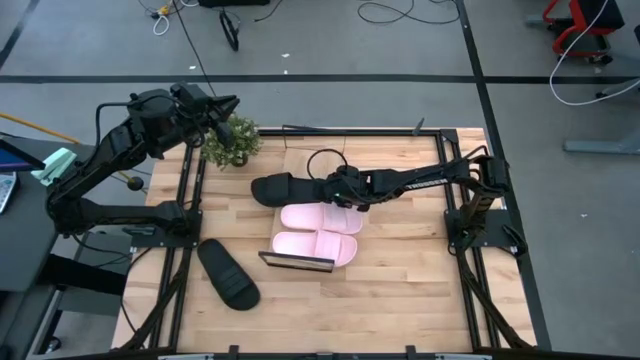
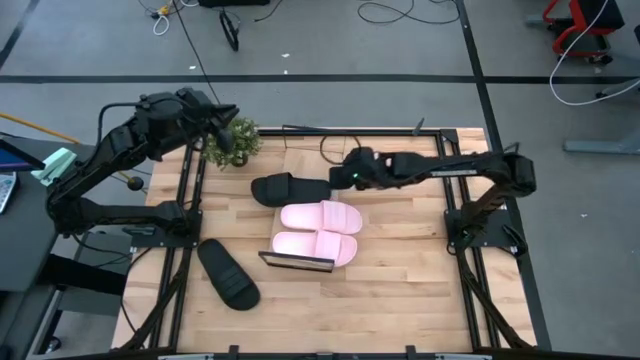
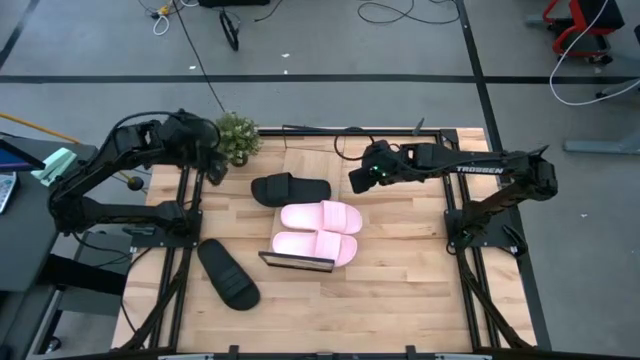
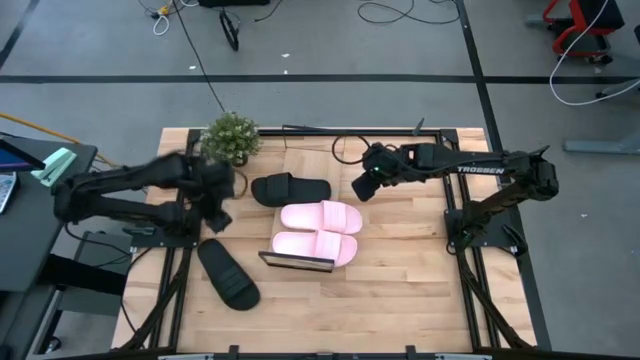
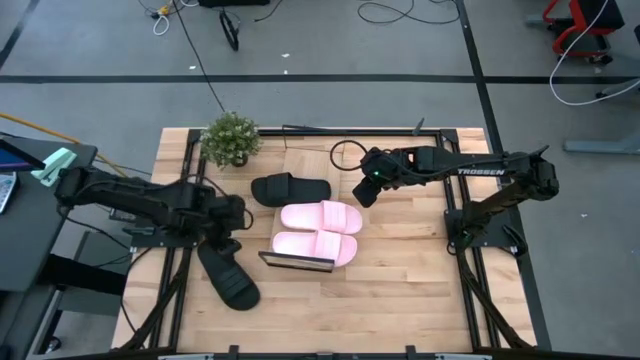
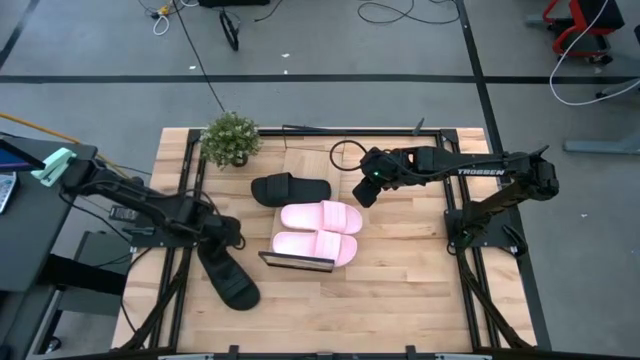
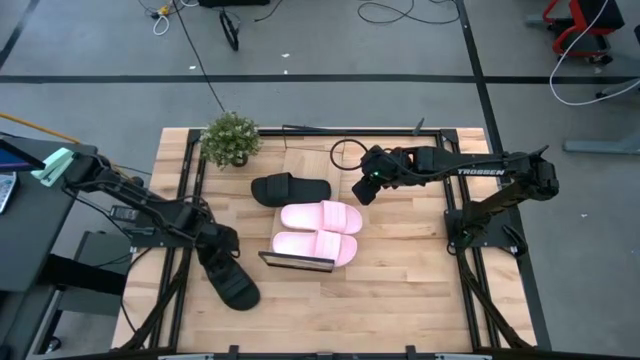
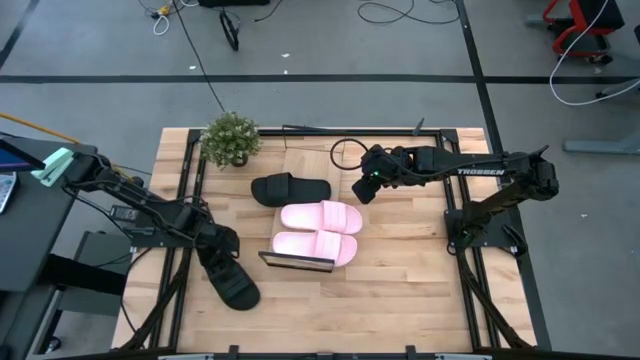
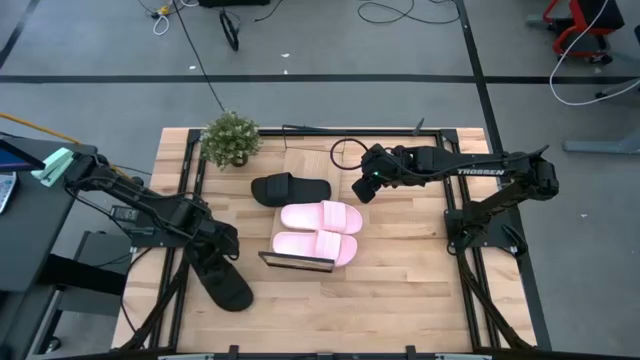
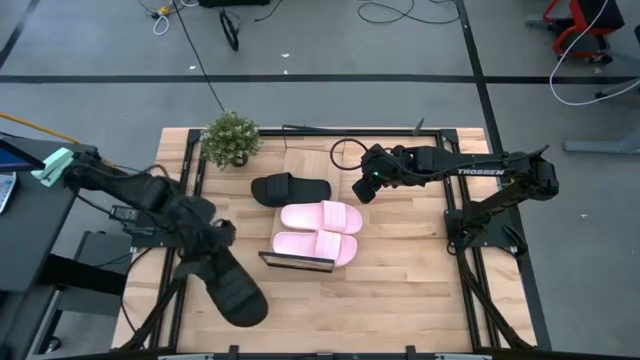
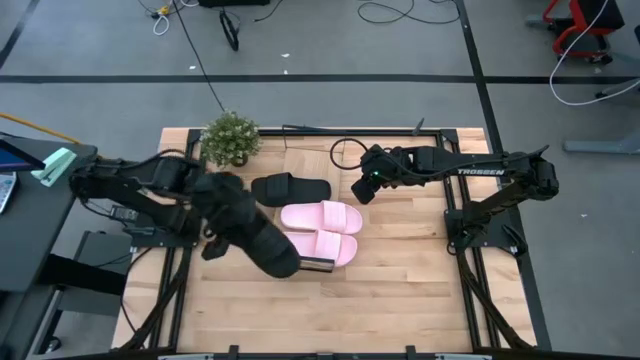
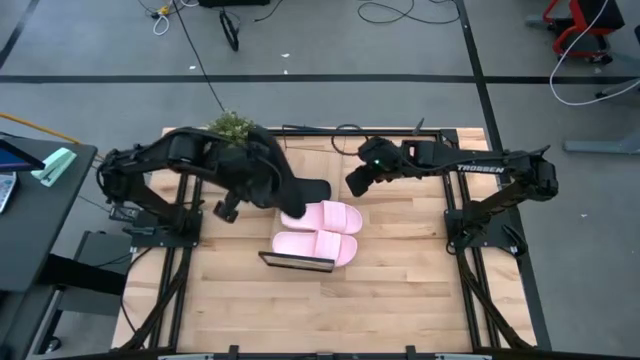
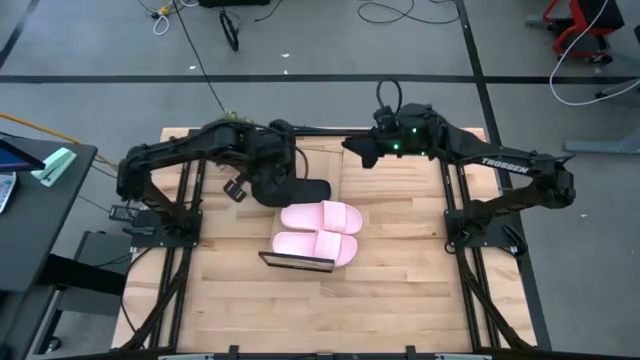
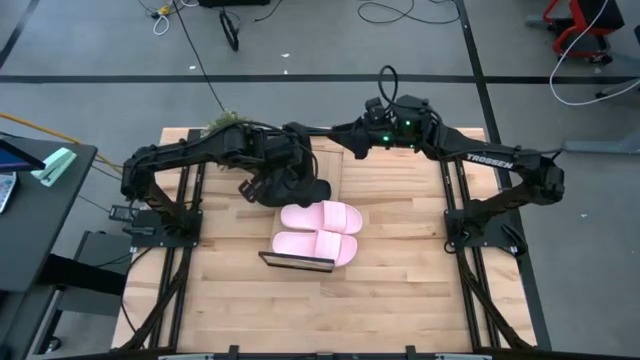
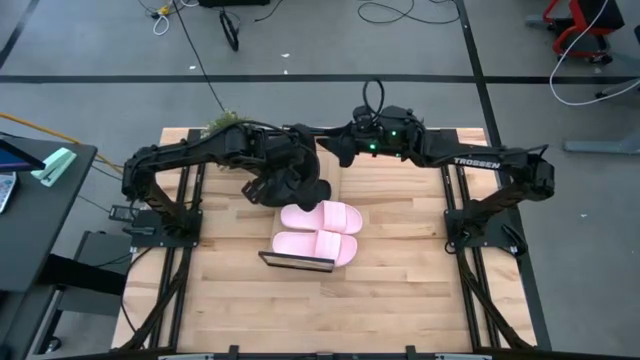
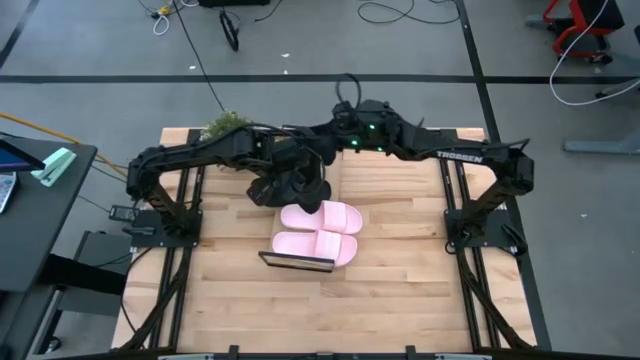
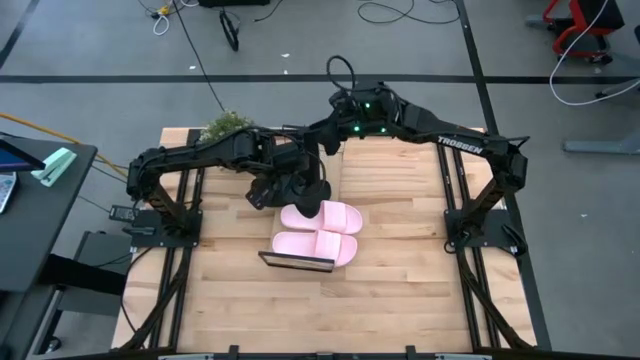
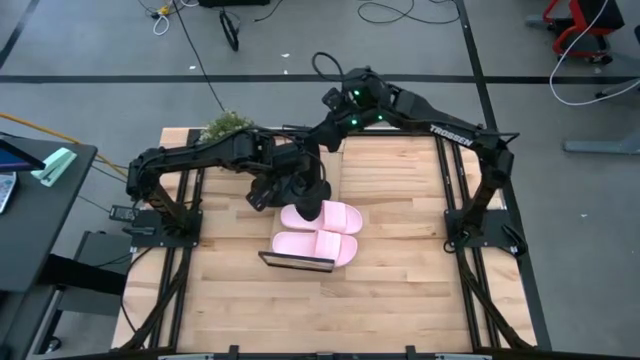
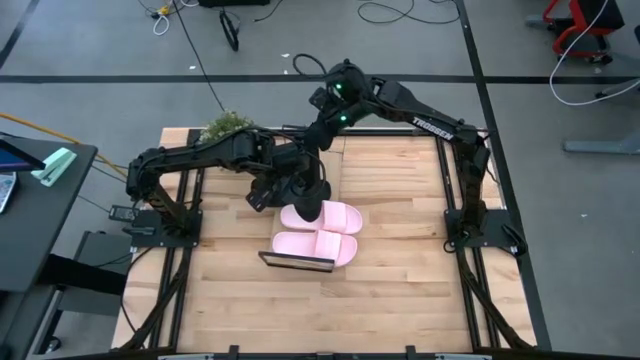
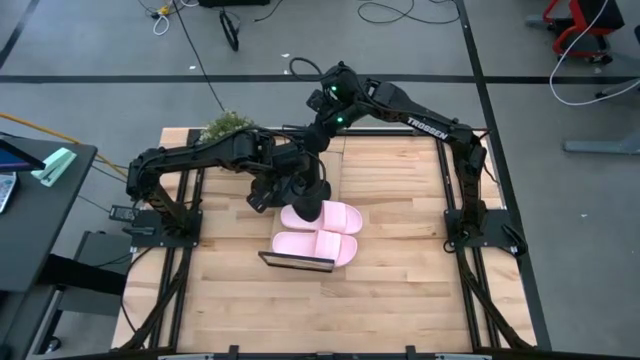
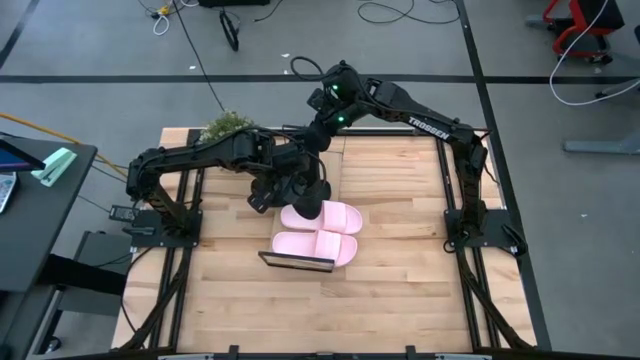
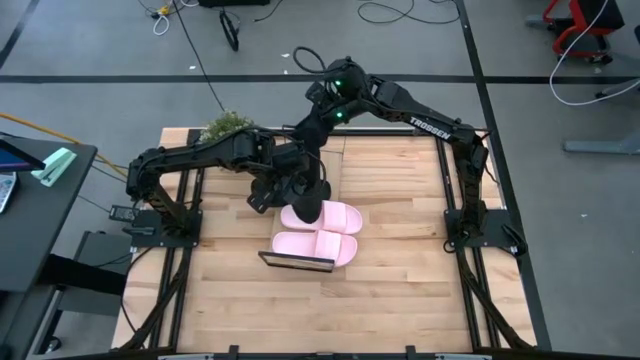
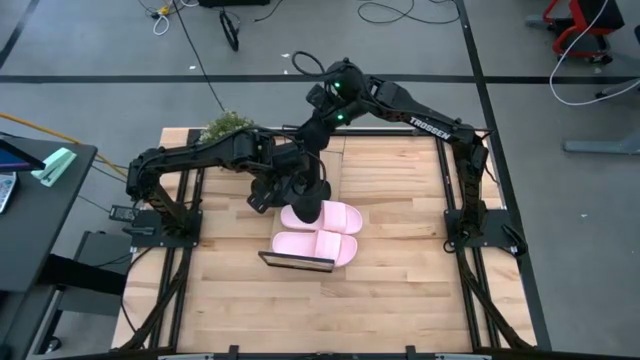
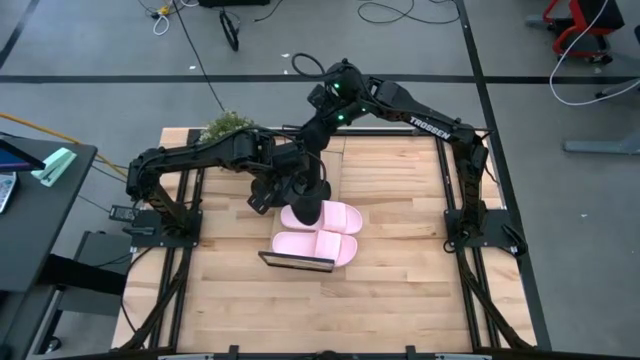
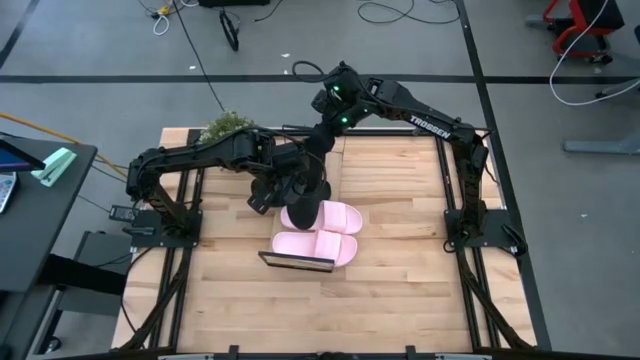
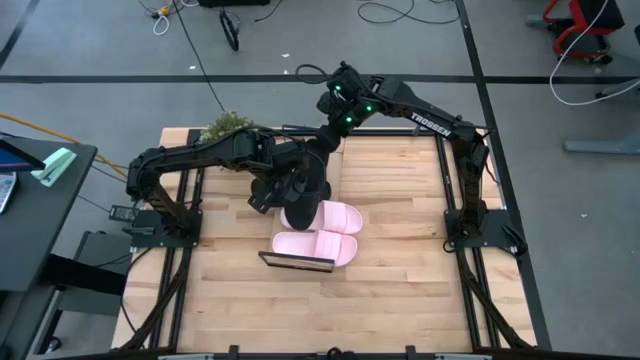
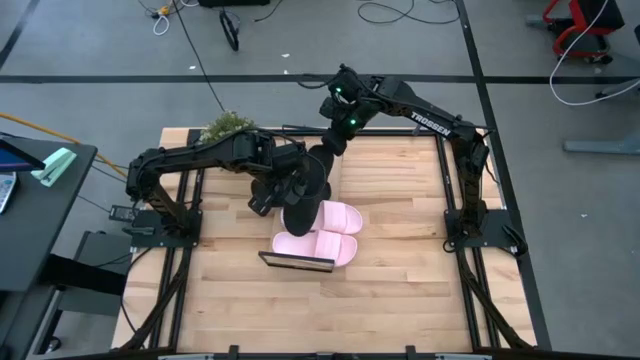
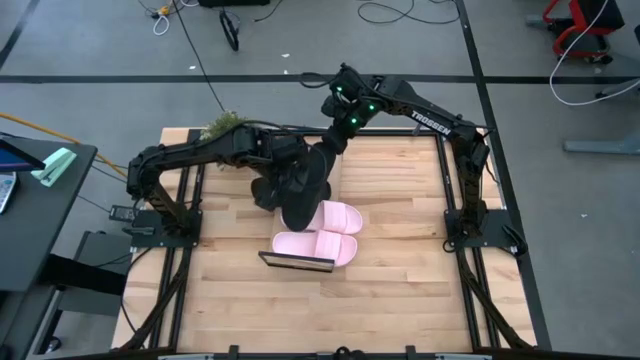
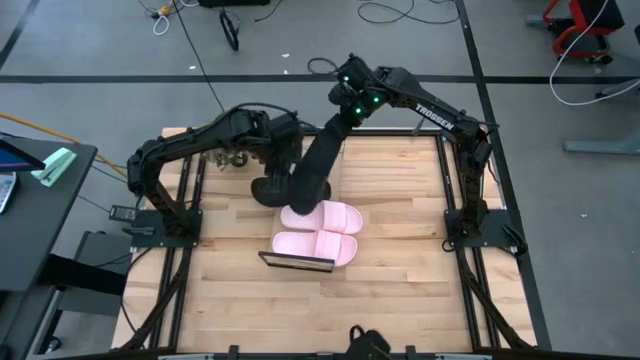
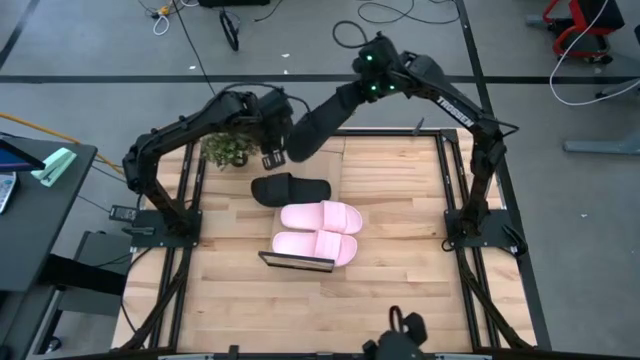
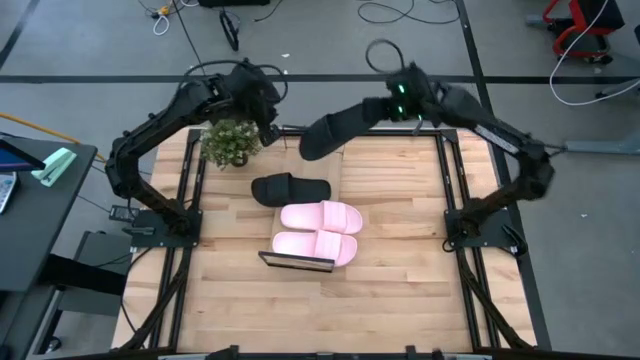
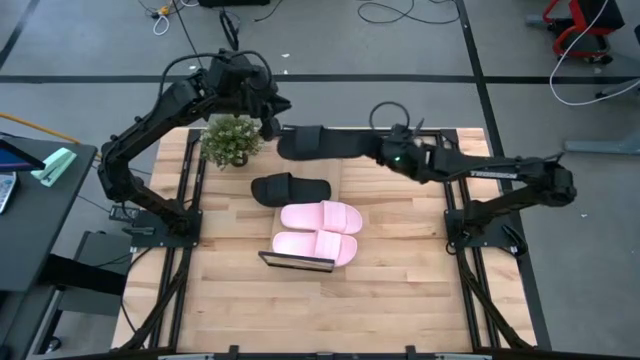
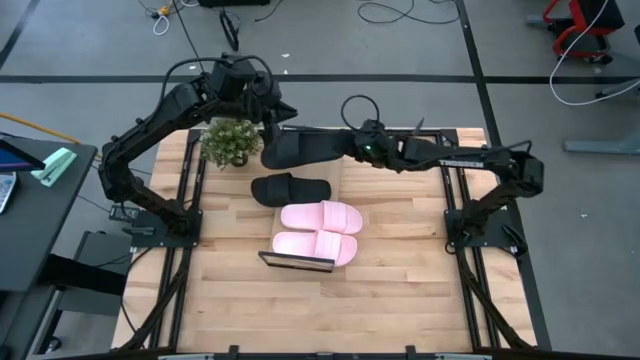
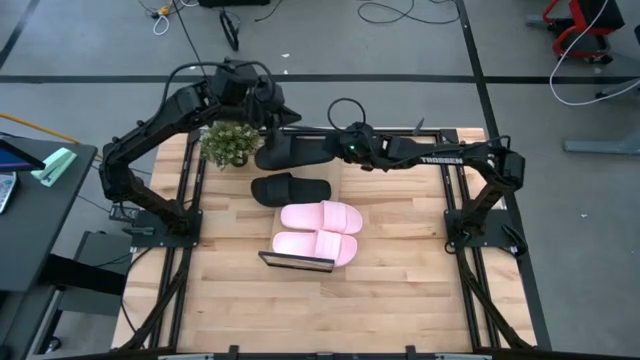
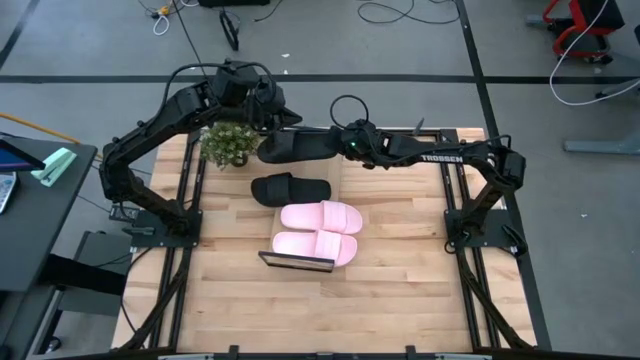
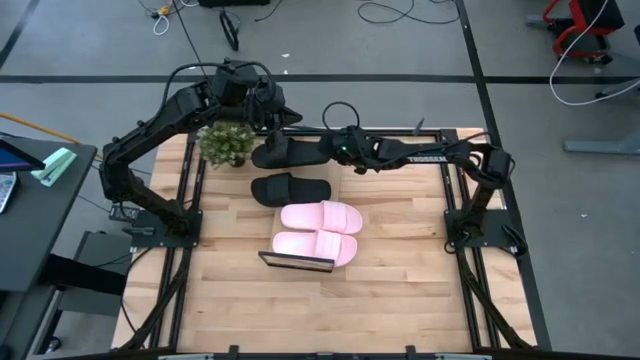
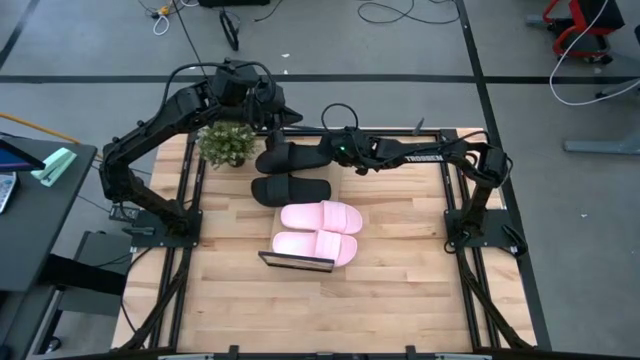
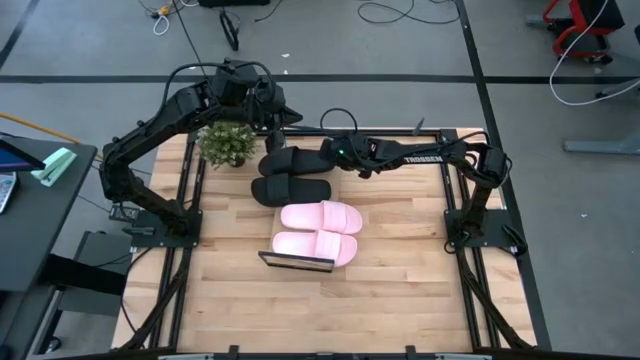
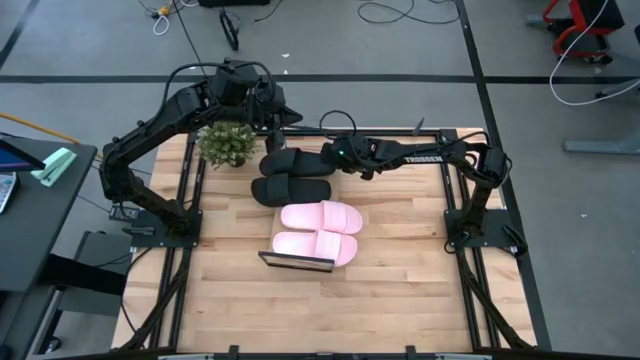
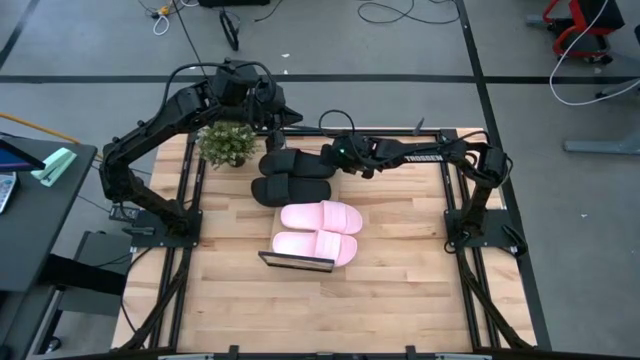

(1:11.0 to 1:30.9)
Task: Pick and place slides into the shelf
Put the black slide on the shelf

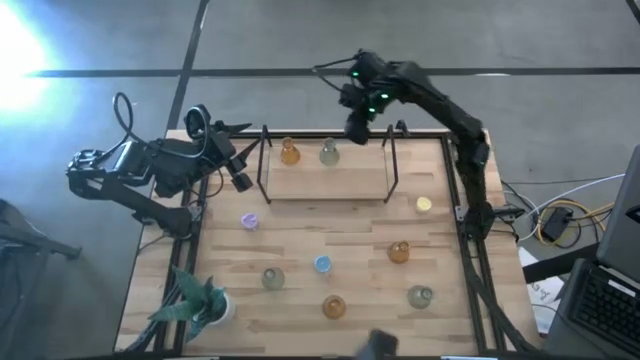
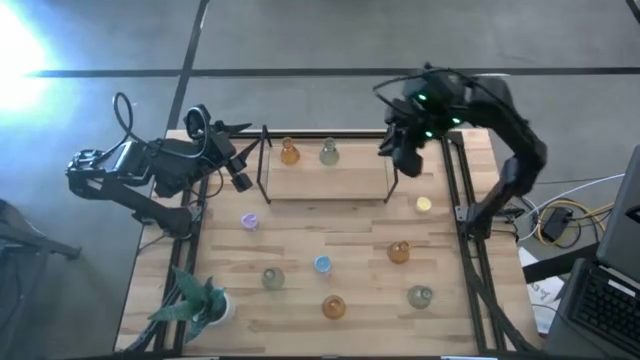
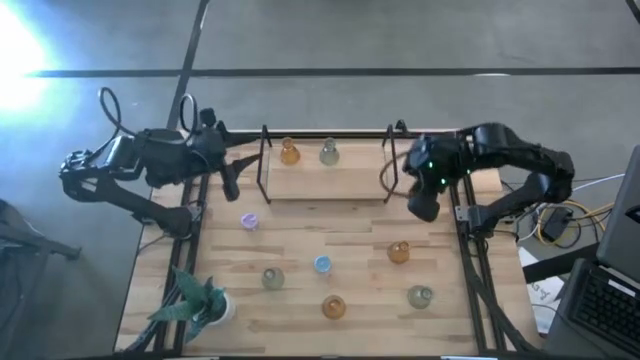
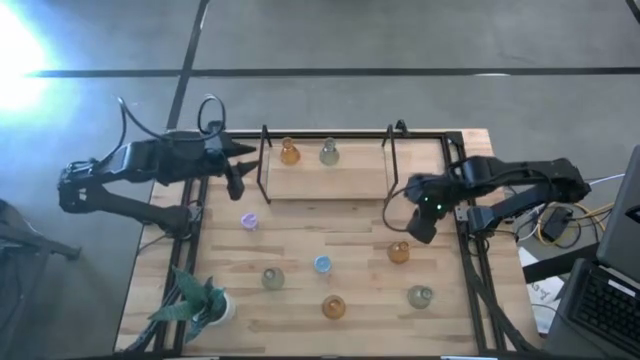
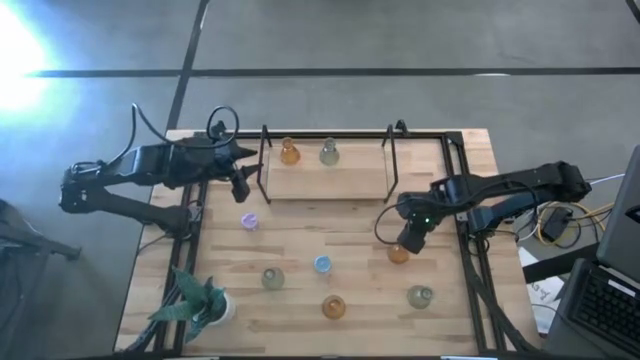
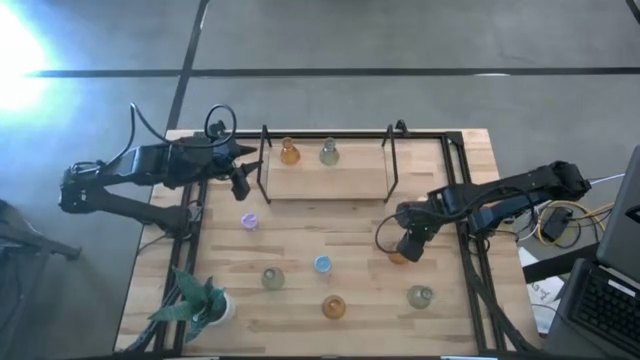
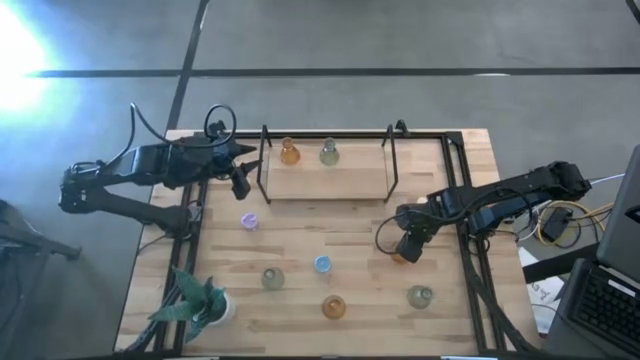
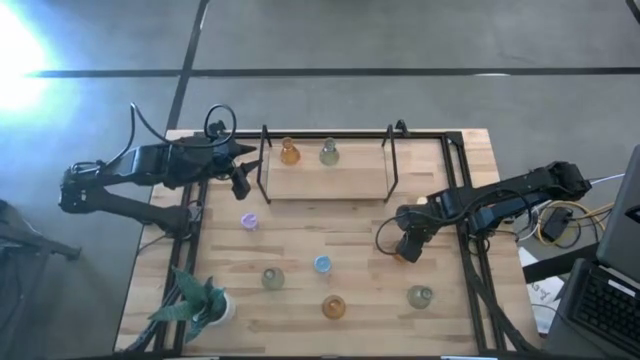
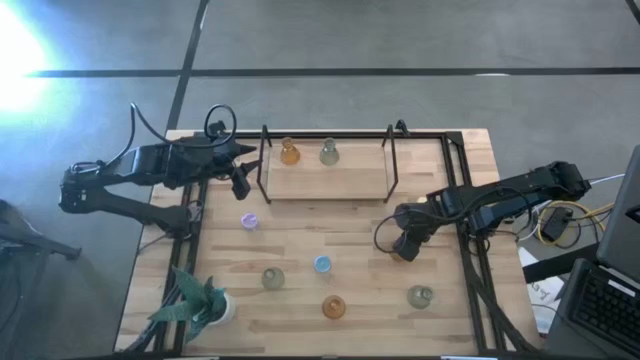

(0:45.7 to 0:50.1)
Task: Pick & Place candle stick holders
Put the top yellow glass candle holder on the shelf
